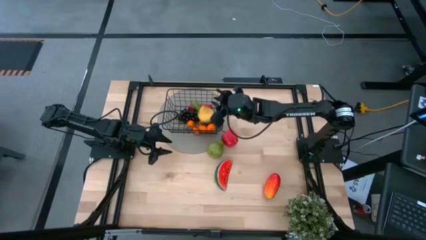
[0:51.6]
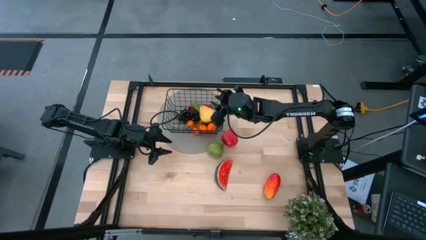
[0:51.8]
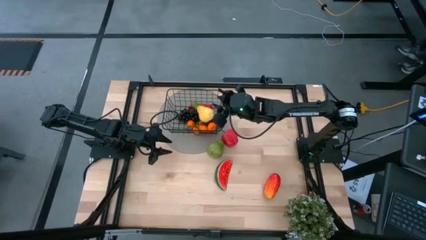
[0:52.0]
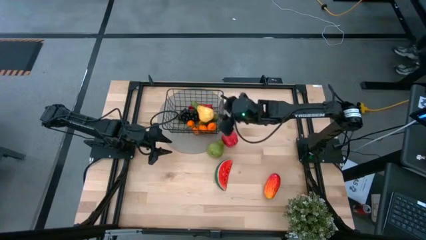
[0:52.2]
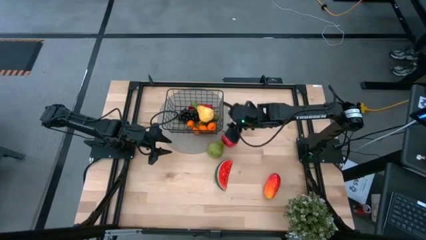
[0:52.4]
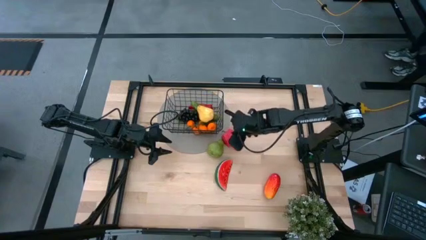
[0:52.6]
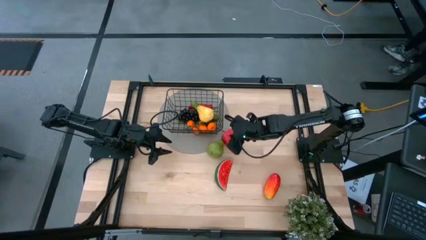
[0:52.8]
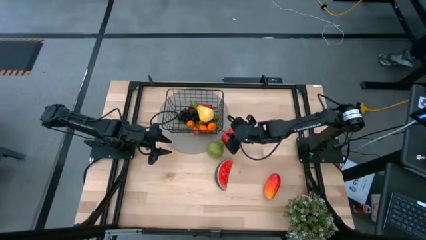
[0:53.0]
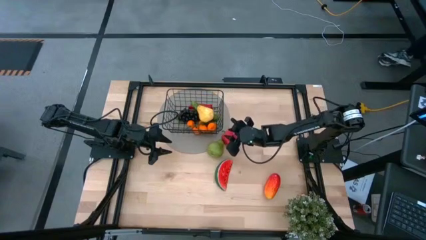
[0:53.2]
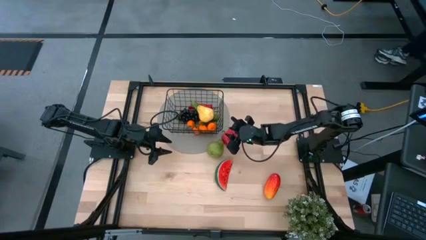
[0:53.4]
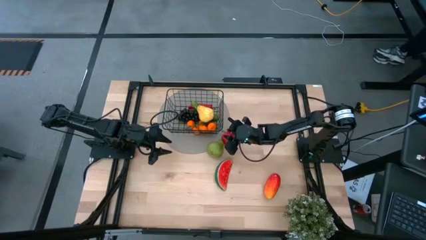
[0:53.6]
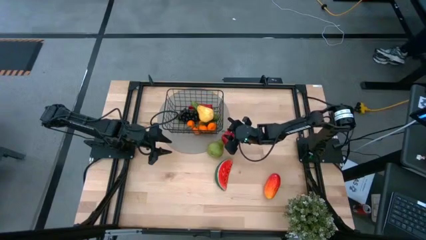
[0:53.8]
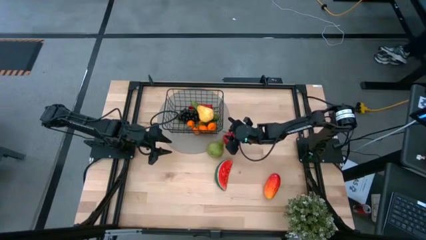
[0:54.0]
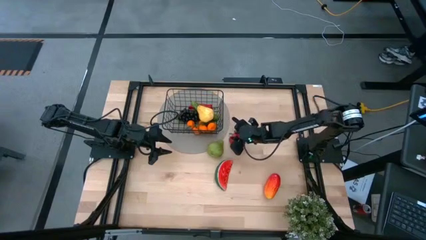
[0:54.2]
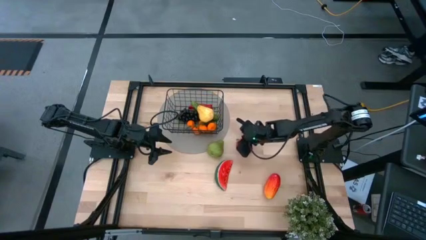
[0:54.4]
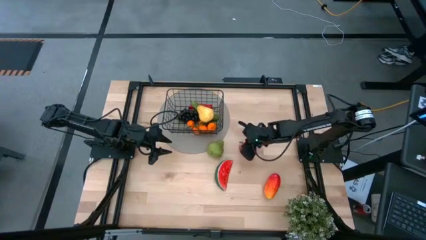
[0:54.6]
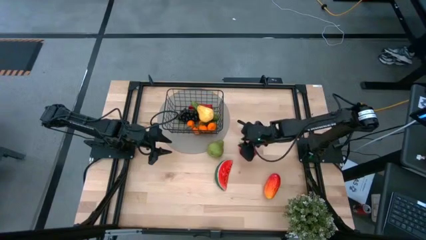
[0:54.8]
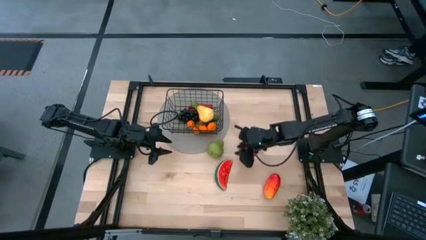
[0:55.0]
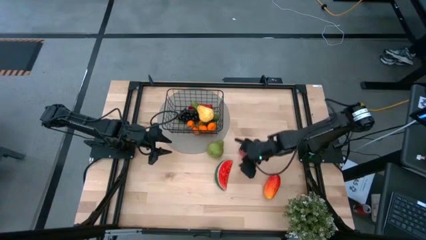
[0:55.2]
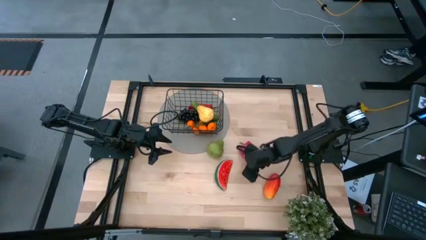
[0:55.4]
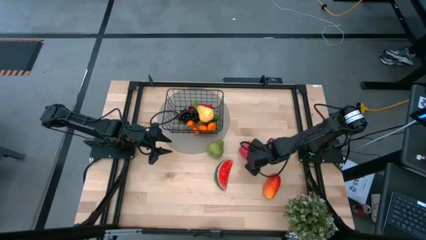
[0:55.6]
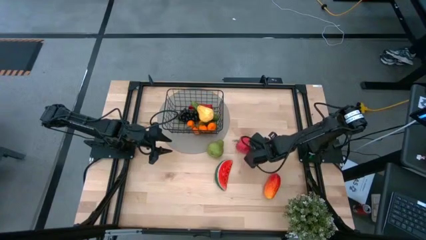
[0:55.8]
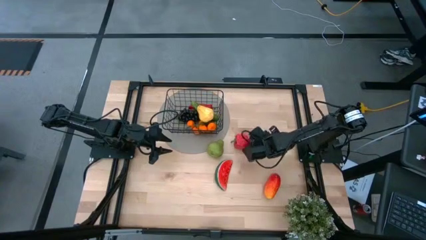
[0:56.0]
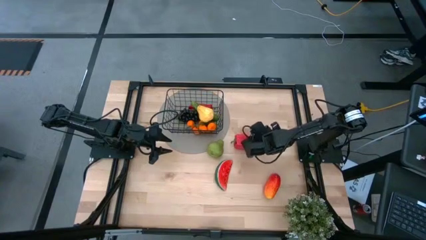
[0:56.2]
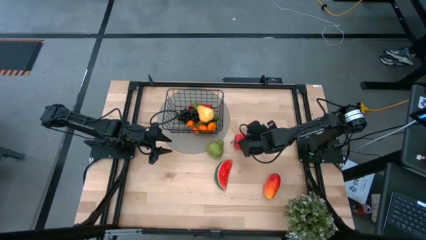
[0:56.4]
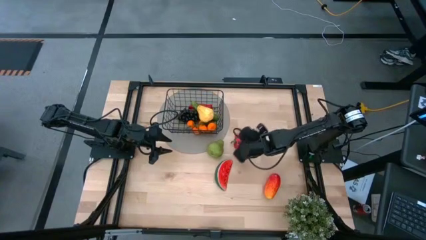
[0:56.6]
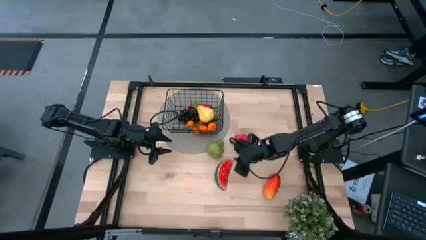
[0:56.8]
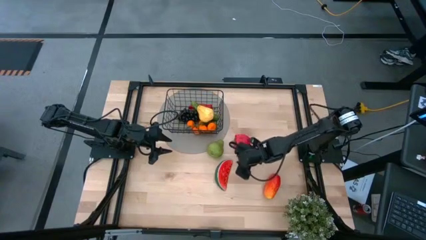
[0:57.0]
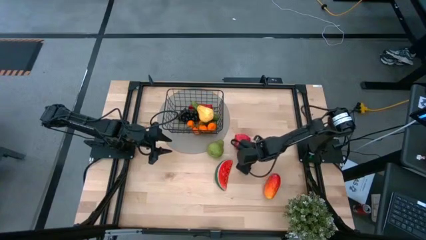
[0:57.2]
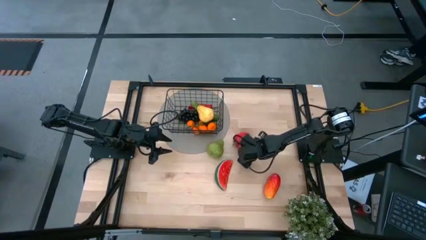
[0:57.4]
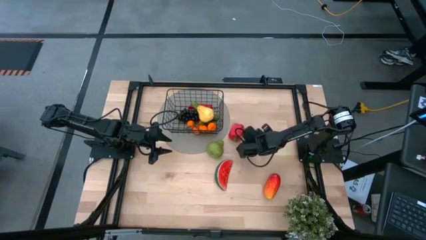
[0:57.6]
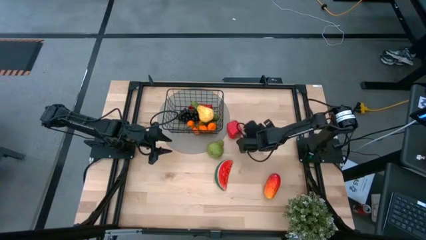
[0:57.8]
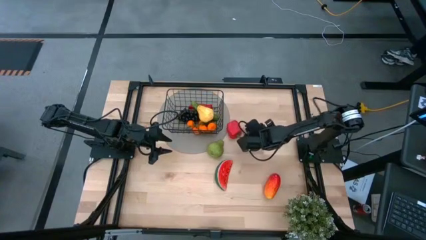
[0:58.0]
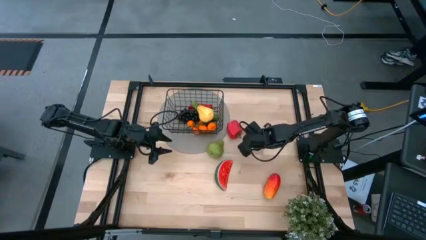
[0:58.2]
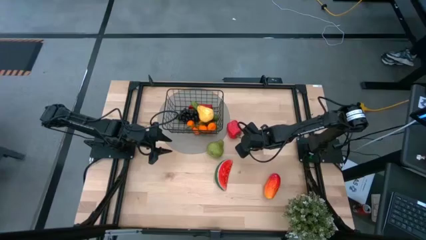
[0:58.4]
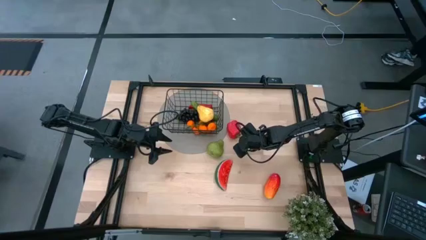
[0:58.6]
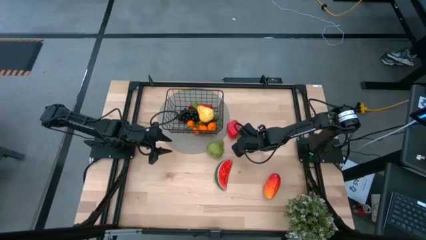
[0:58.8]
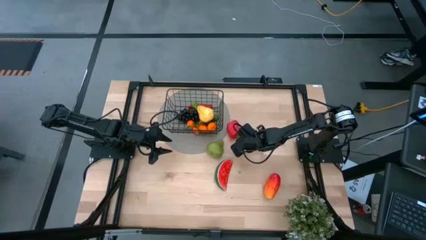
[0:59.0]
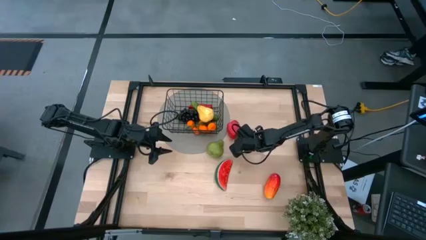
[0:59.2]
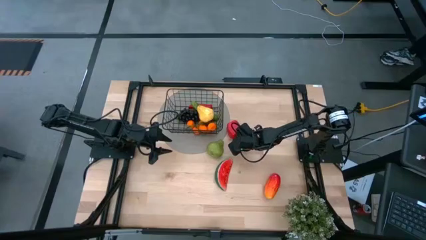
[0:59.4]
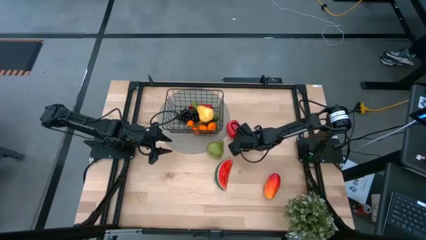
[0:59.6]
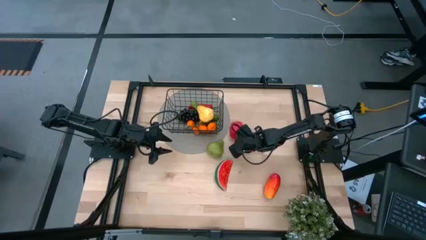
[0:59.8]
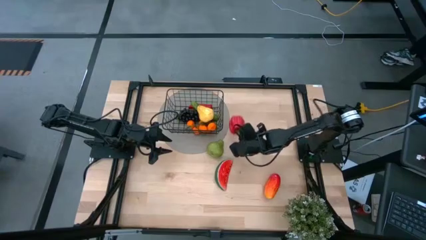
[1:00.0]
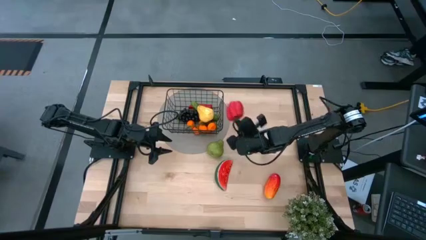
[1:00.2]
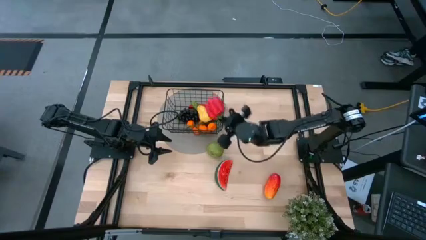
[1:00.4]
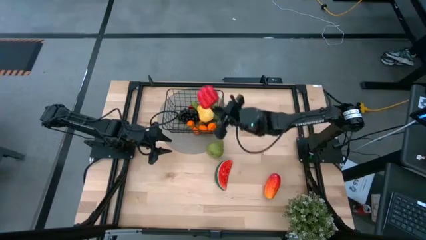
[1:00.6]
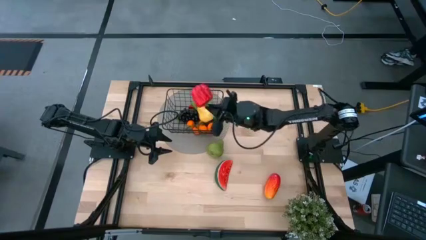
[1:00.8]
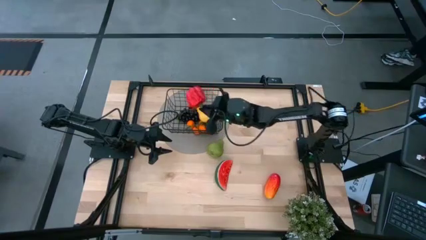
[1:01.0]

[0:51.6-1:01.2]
Task: Build produce basket
Put the red bell pepper into the wire basket

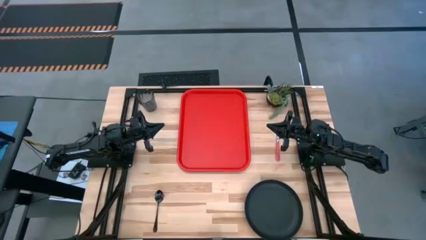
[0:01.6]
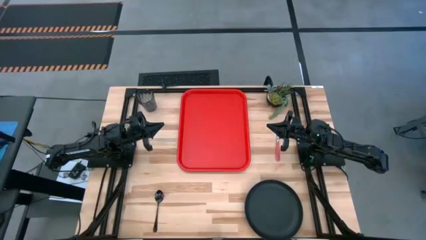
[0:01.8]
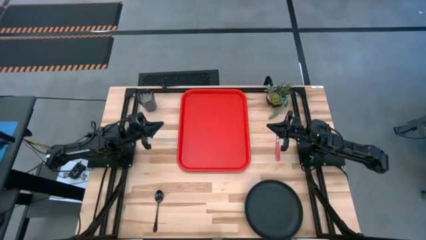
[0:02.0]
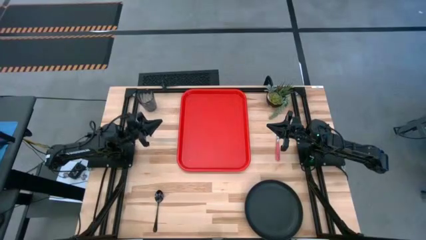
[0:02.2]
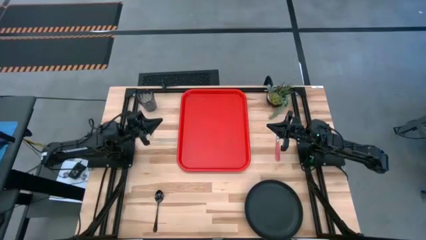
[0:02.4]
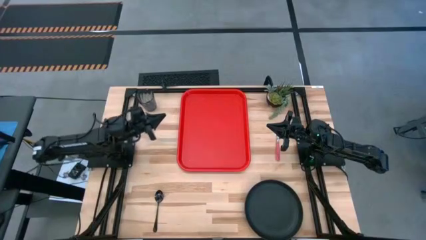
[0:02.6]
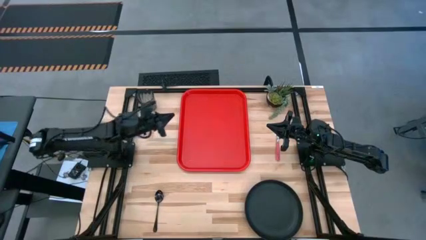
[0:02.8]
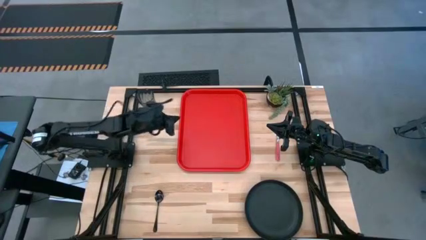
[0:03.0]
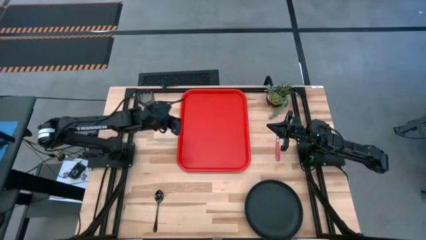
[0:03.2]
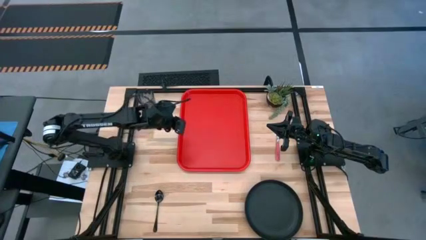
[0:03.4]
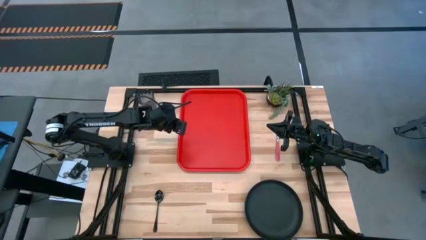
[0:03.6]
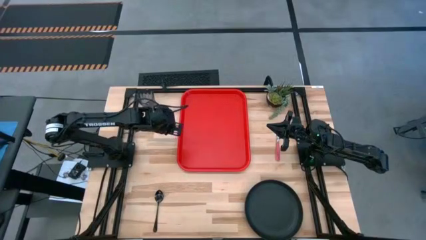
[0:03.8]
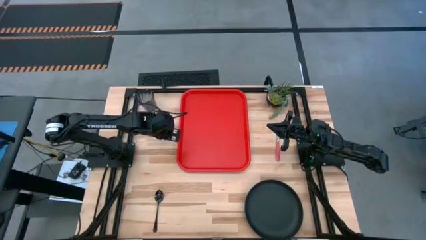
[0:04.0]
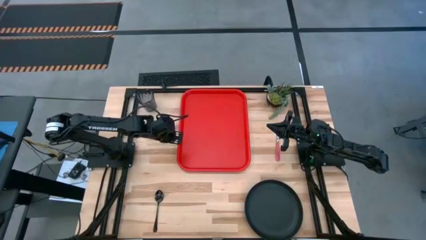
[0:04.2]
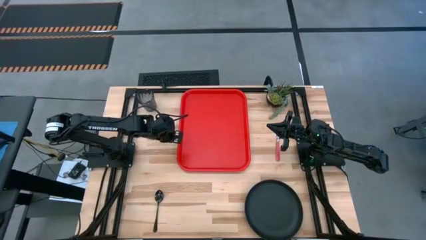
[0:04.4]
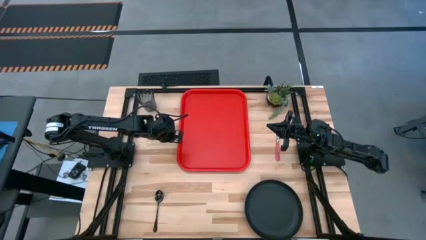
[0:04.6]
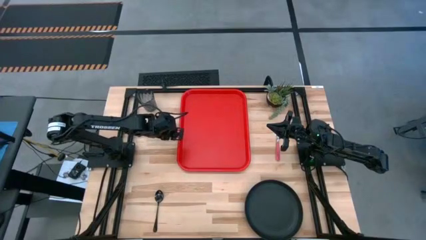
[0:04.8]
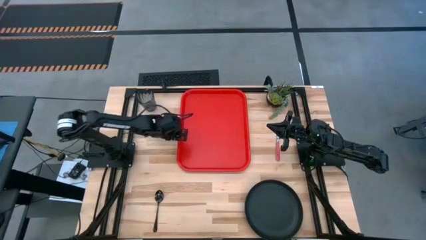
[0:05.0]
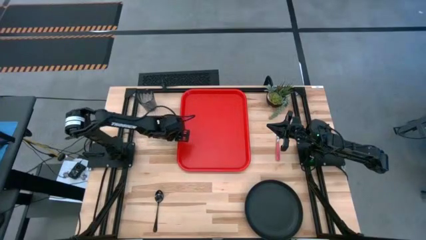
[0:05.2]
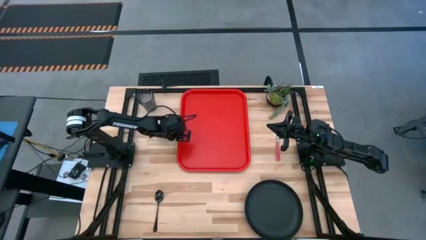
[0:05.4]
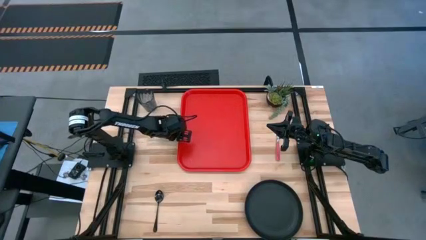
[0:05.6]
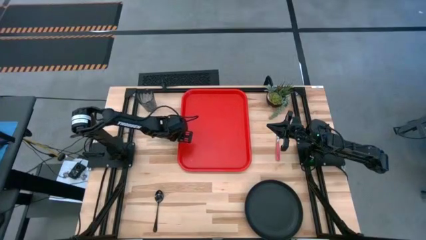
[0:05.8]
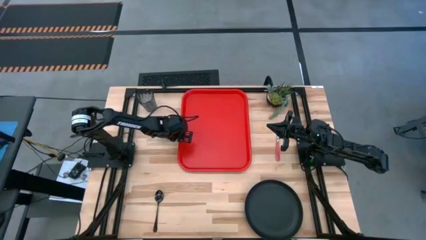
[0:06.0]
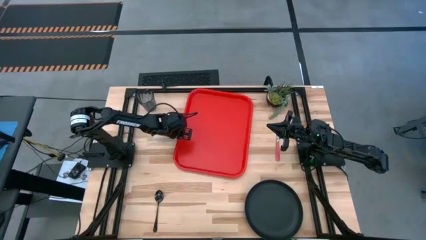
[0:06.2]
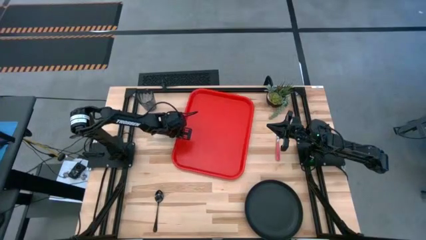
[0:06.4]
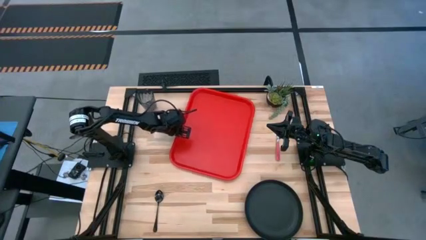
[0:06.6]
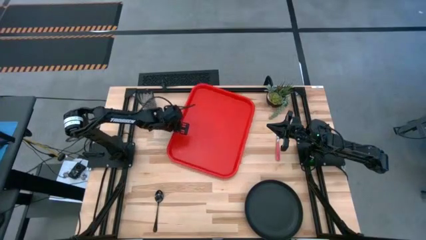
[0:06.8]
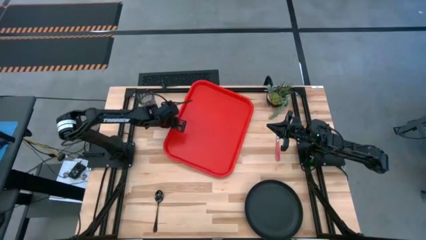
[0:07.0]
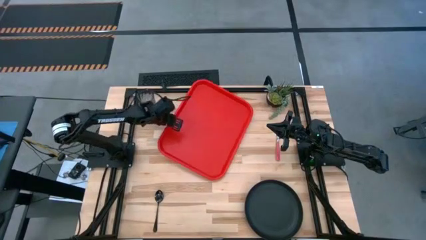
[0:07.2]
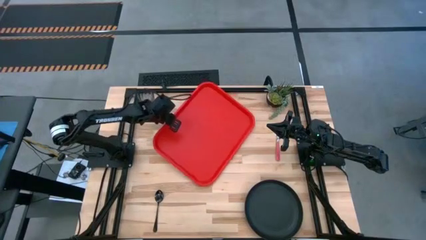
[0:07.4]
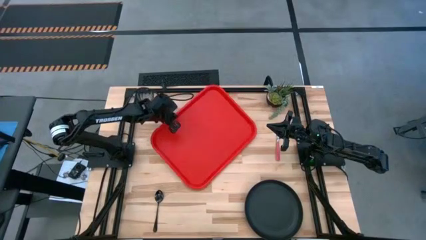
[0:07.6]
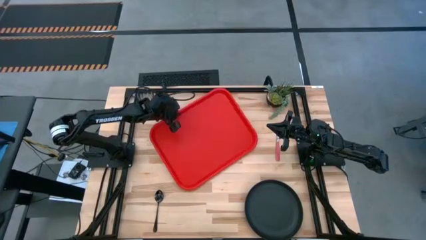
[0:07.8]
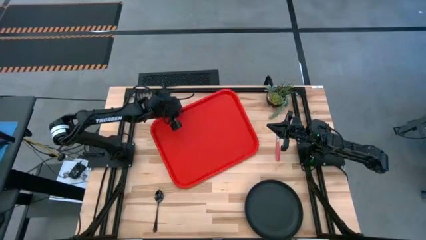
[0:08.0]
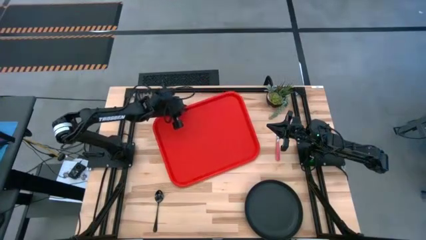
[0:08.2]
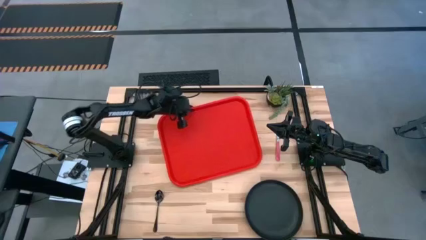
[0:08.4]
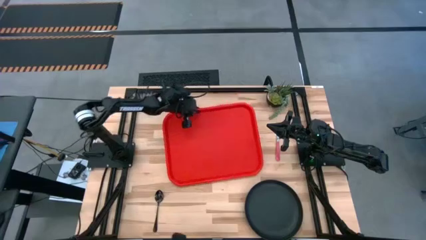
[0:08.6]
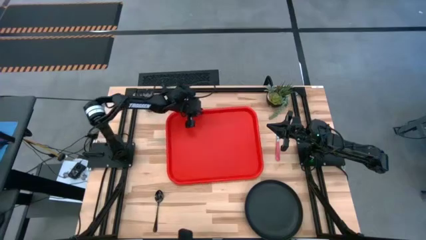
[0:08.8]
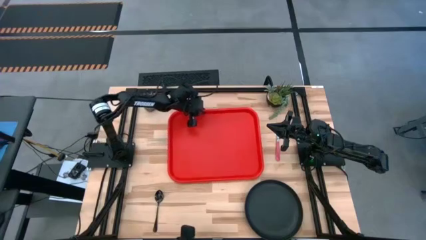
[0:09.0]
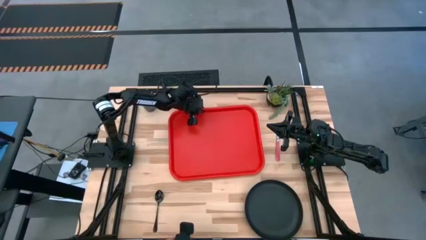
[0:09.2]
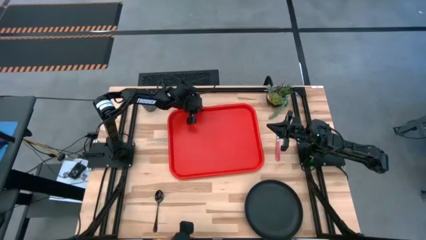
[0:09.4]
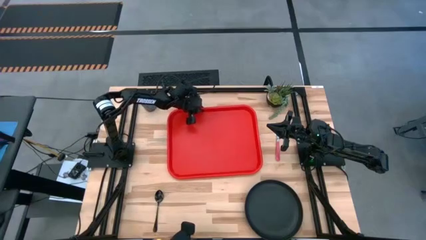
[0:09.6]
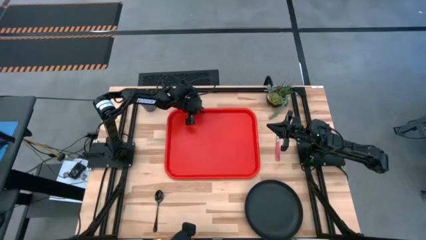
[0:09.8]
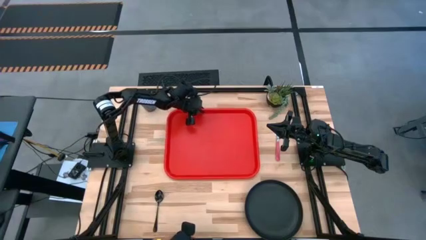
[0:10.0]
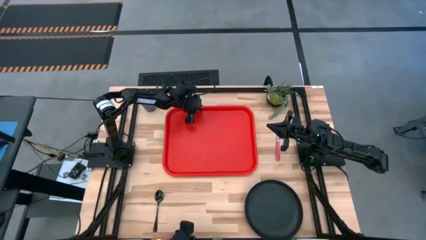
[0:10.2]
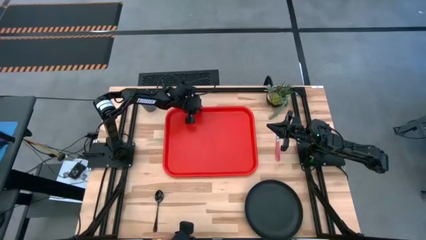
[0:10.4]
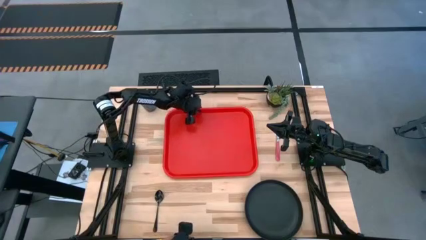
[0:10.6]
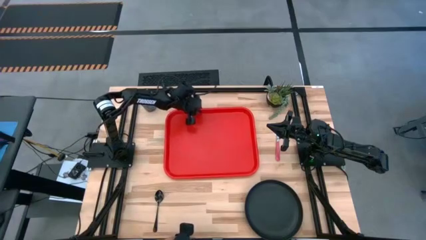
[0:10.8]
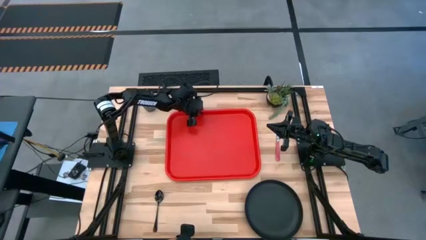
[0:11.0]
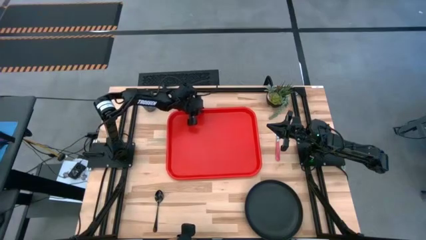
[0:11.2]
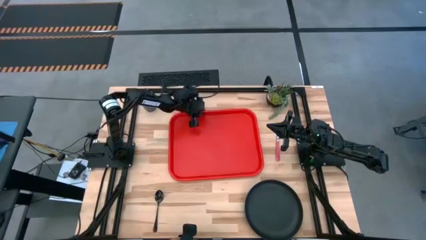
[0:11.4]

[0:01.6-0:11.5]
Task: Pick and place plate/cup/fork/spoon on tray
Adjust the red tray
